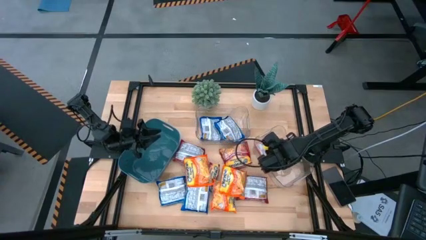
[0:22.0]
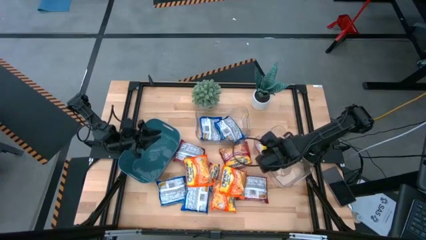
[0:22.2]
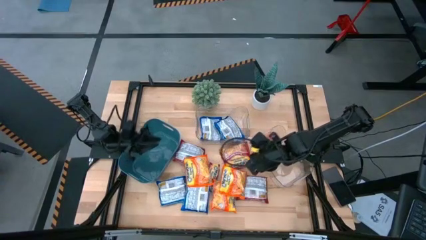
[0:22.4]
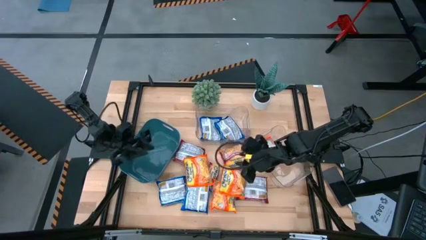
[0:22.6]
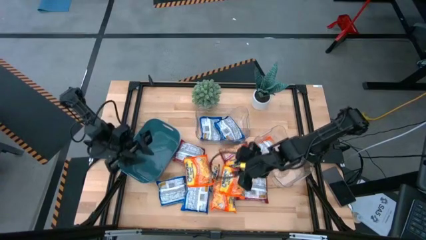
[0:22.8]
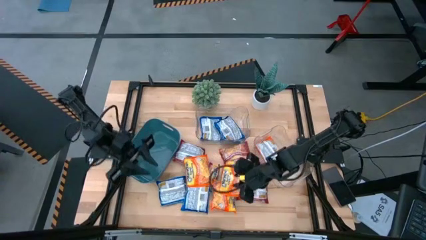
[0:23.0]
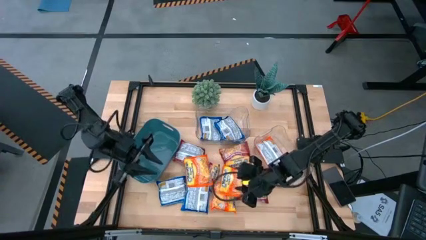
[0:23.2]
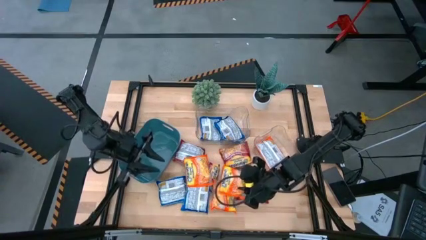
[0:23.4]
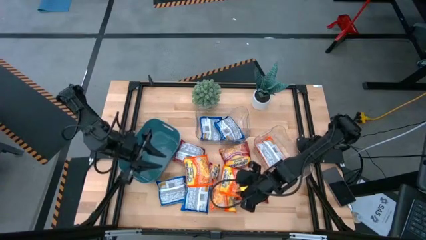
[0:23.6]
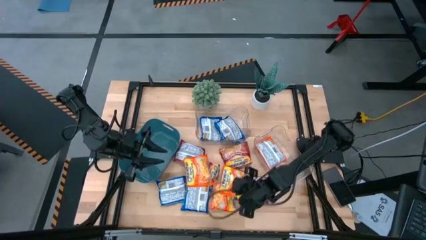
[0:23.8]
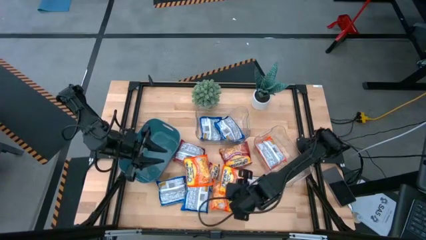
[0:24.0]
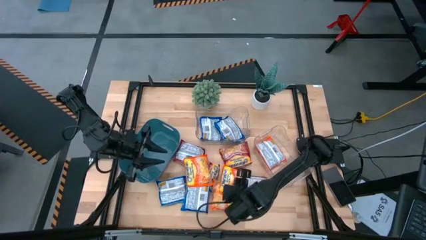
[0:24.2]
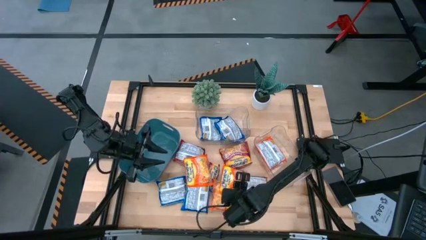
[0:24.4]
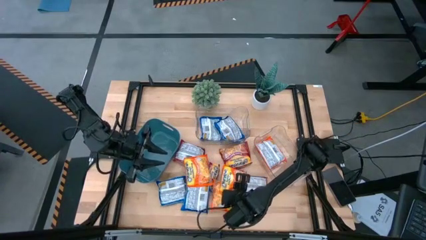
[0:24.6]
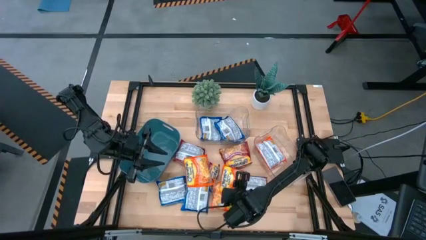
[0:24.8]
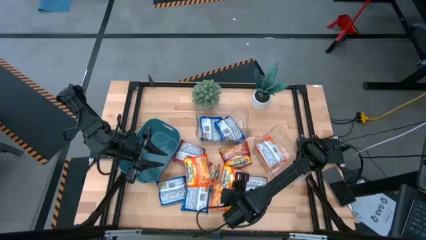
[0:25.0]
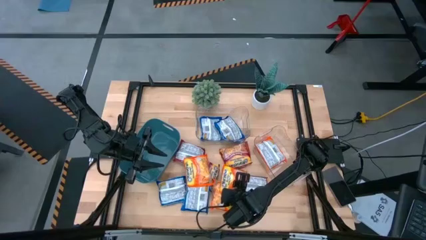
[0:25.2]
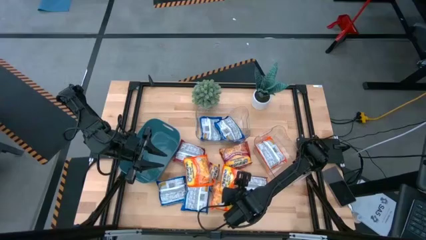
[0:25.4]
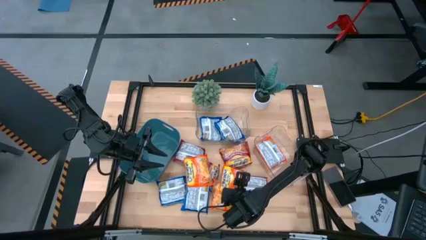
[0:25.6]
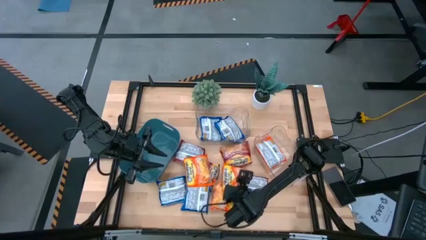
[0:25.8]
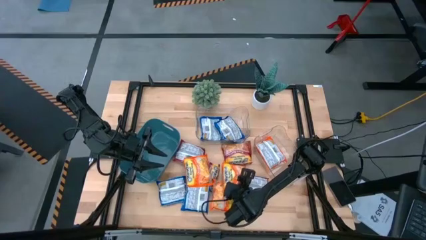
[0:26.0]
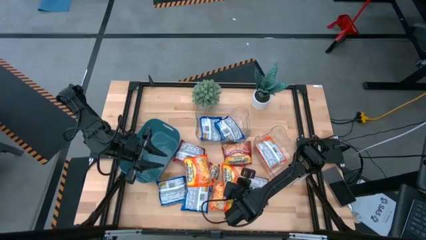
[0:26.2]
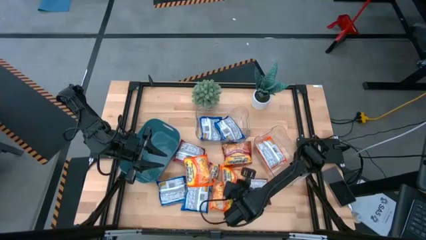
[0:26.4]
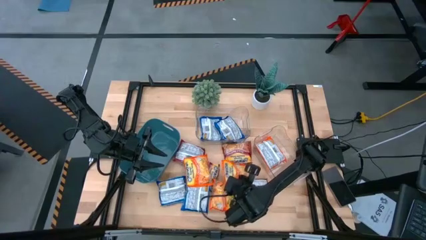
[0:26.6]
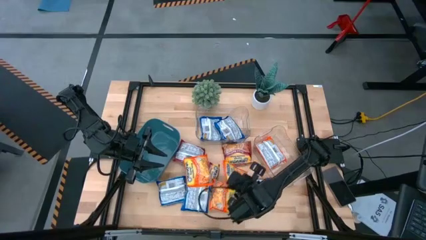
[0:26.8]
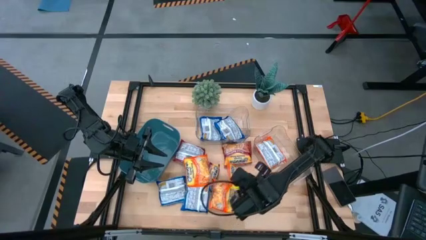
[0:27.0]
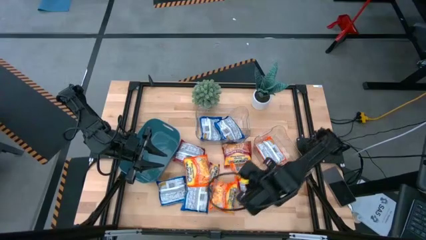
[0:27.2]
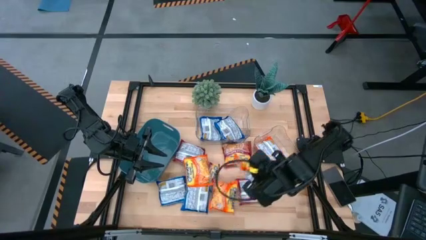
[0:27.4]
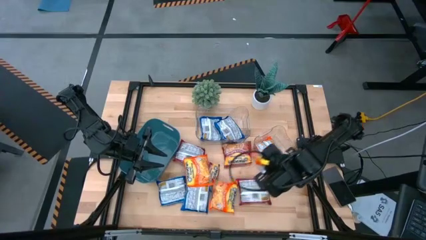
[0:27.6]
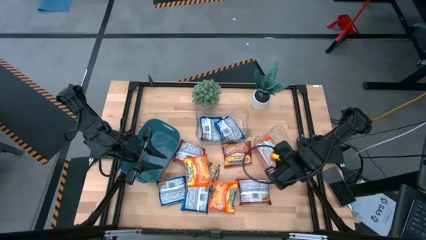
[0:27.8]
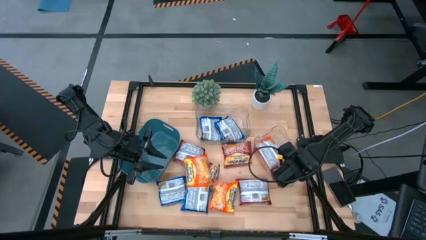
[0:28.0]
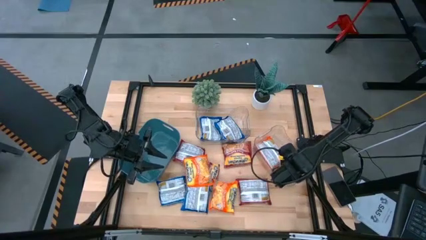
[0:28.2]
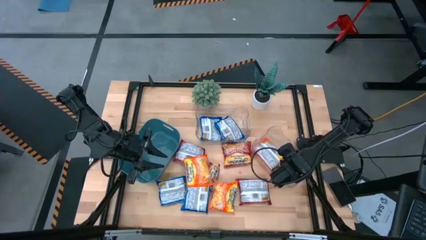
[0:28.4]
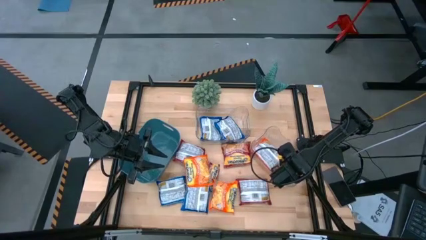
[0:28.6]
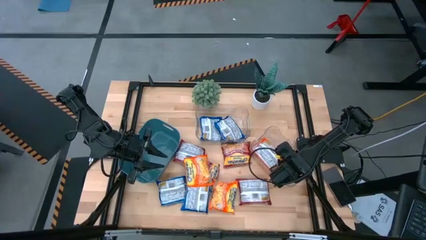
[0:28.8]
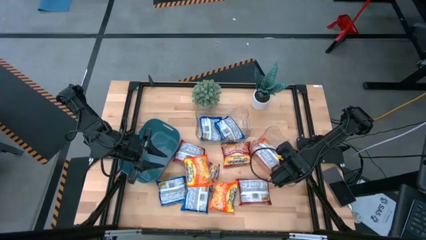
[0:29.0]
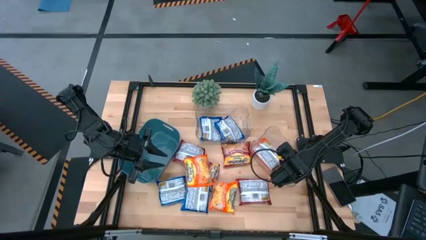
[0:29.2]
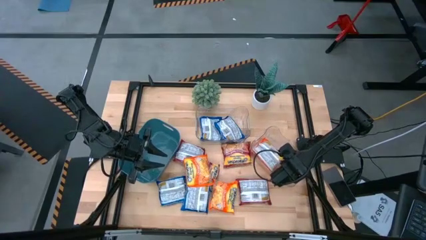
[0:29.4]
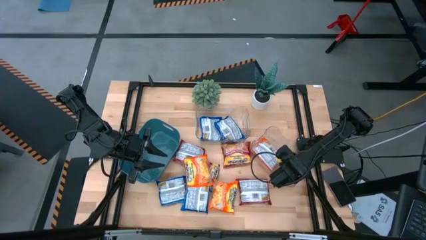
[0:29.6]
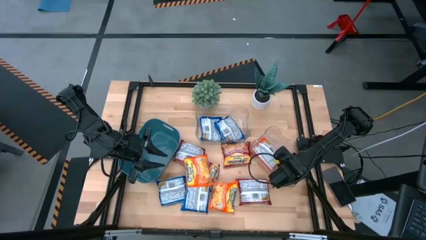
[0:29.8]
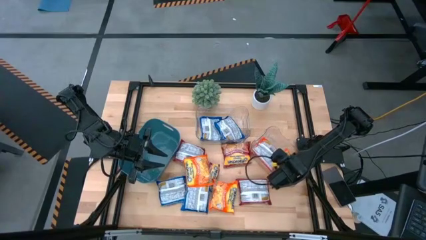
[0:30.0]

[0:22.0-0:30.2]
Task: Sort Maruchan noodles
Put the right orange noodle pack into the right transparent bin

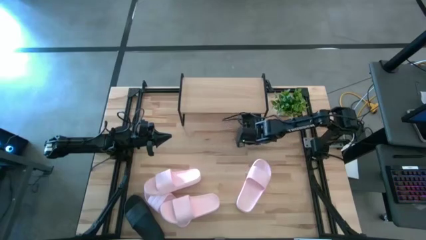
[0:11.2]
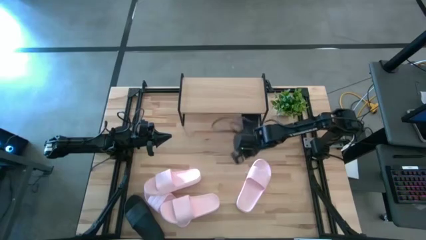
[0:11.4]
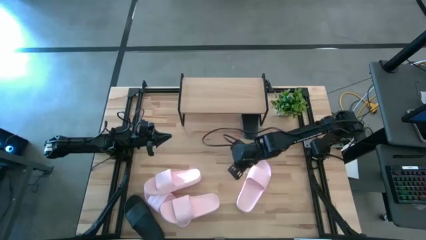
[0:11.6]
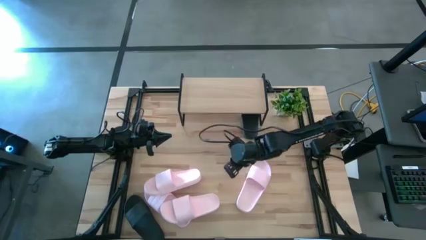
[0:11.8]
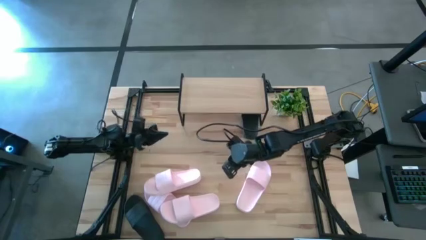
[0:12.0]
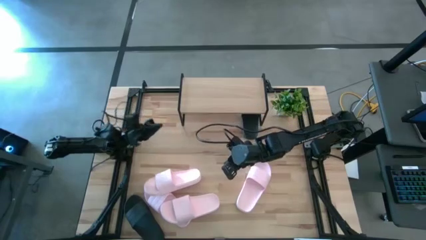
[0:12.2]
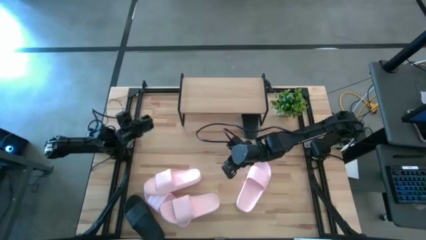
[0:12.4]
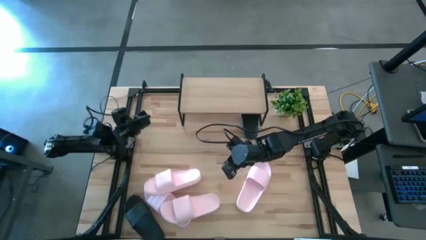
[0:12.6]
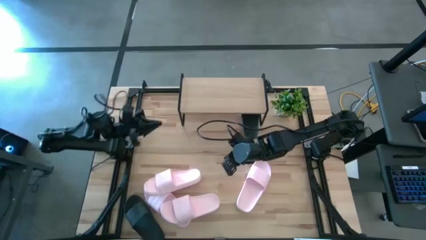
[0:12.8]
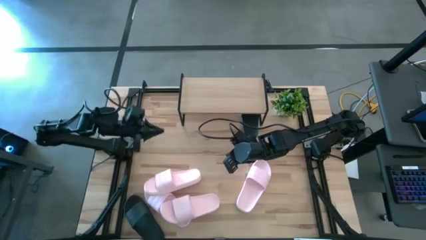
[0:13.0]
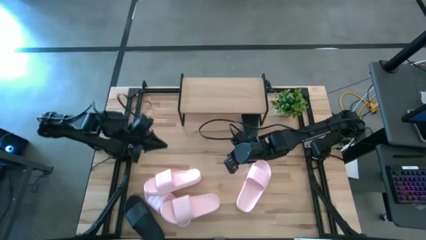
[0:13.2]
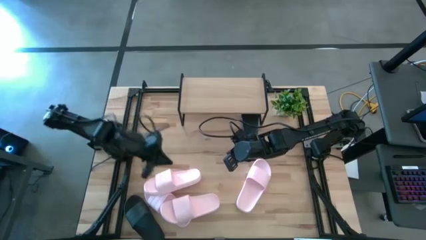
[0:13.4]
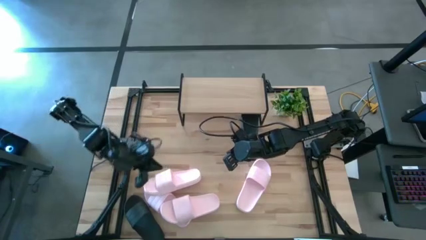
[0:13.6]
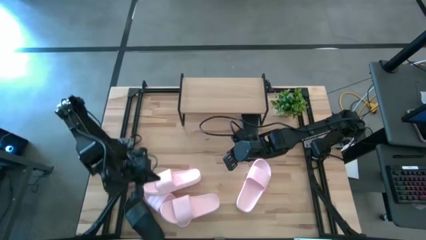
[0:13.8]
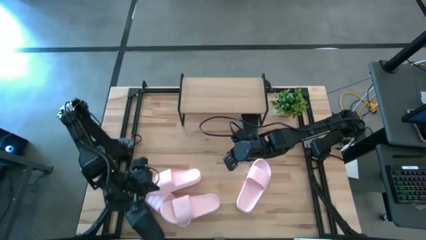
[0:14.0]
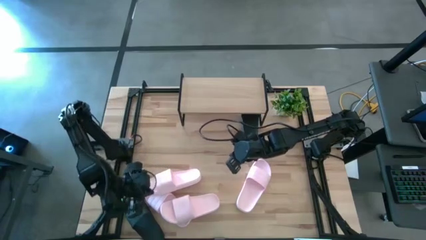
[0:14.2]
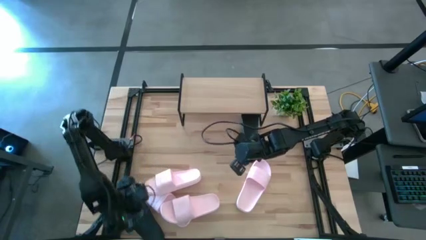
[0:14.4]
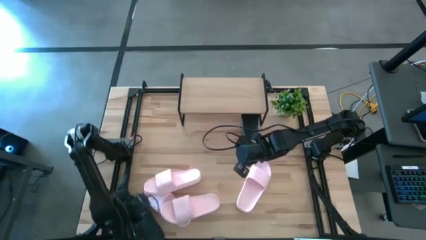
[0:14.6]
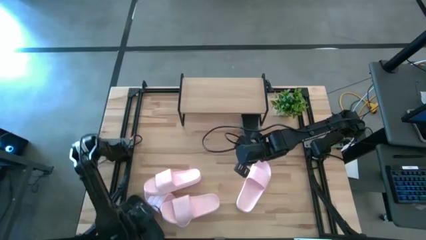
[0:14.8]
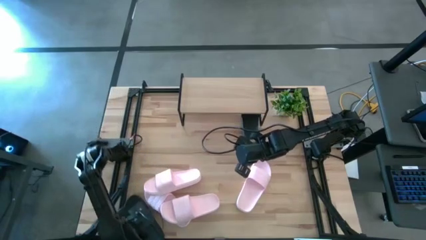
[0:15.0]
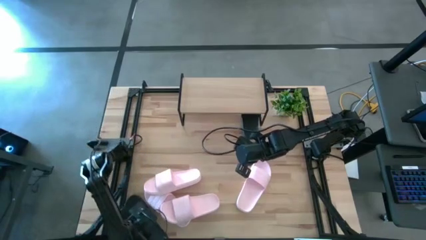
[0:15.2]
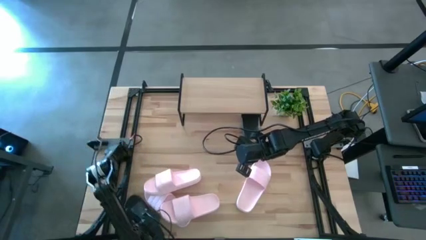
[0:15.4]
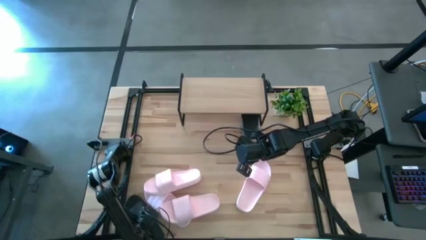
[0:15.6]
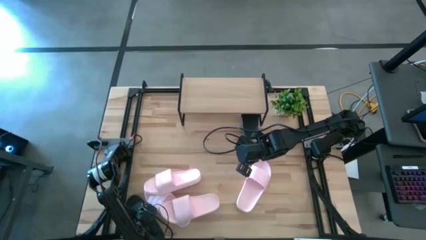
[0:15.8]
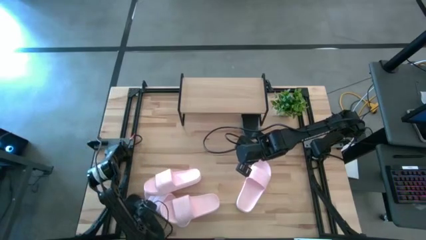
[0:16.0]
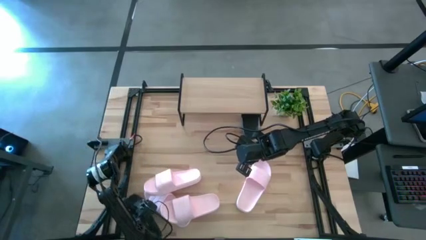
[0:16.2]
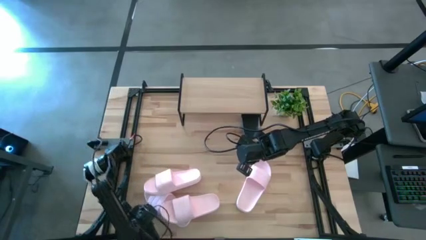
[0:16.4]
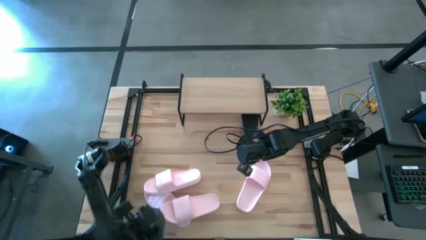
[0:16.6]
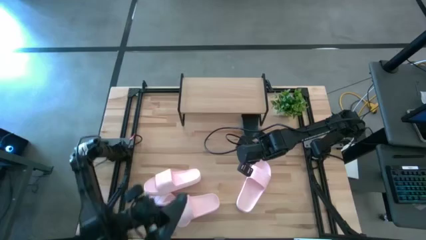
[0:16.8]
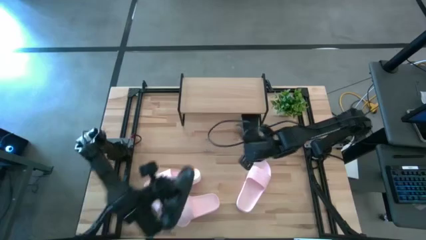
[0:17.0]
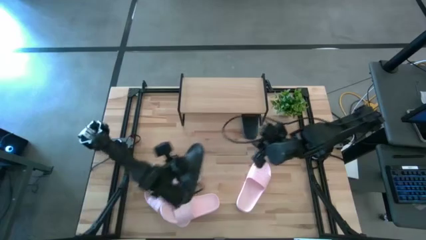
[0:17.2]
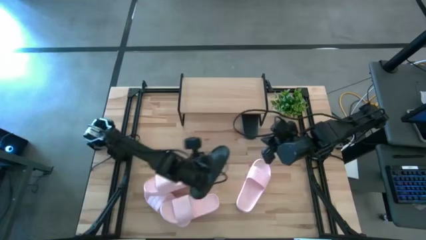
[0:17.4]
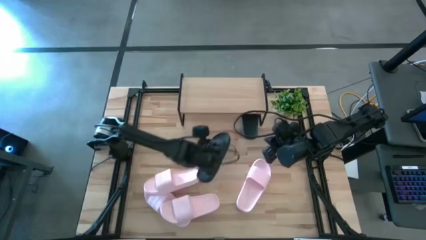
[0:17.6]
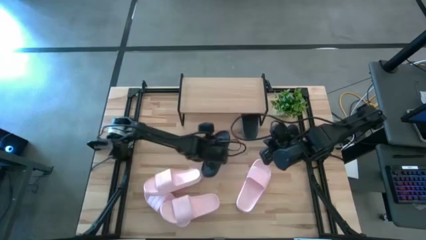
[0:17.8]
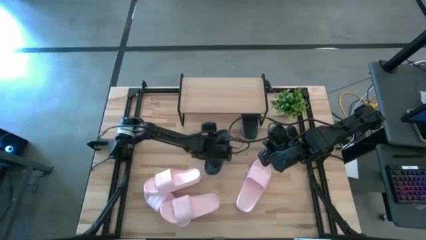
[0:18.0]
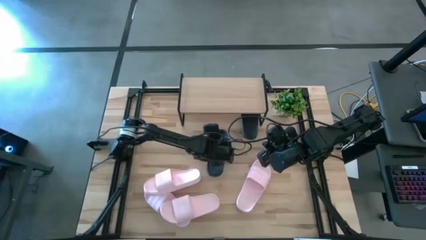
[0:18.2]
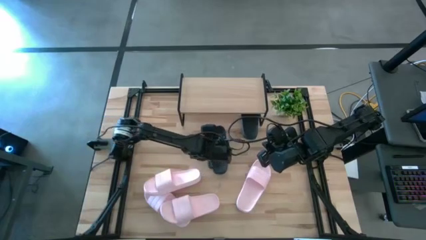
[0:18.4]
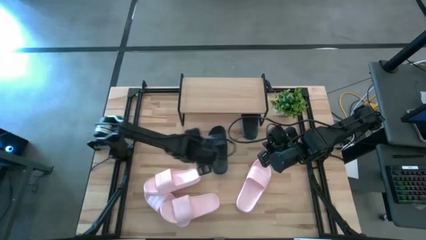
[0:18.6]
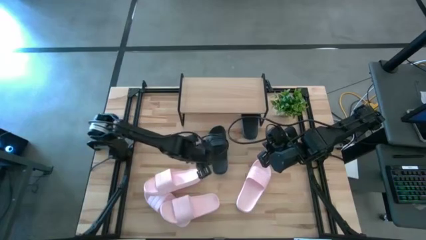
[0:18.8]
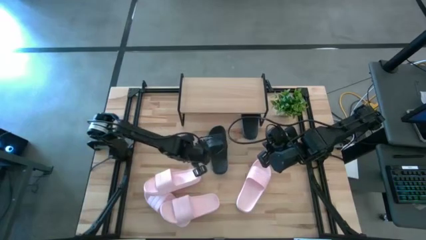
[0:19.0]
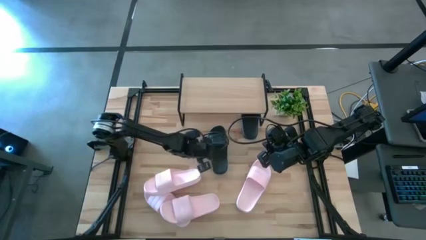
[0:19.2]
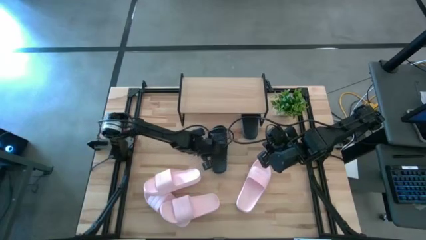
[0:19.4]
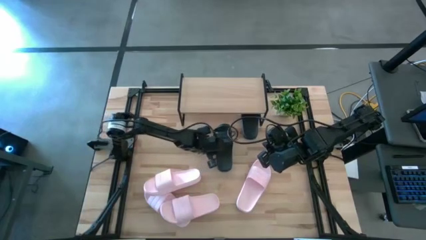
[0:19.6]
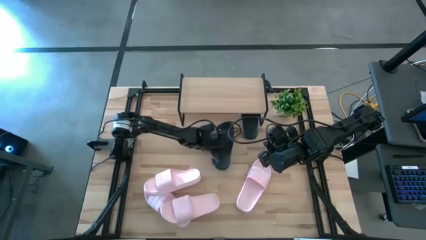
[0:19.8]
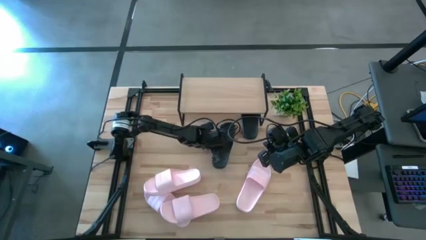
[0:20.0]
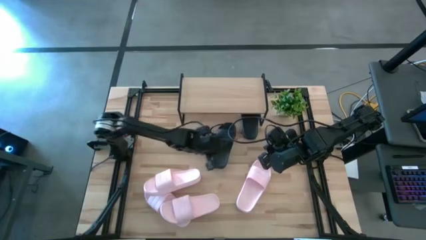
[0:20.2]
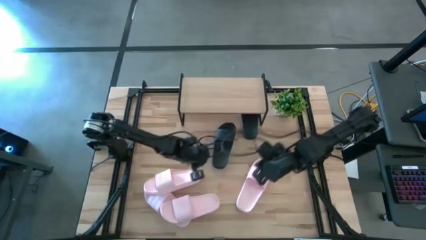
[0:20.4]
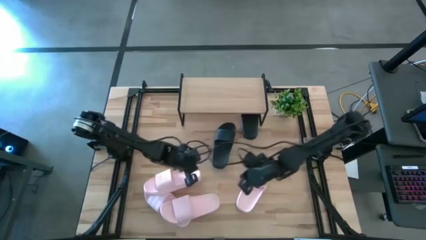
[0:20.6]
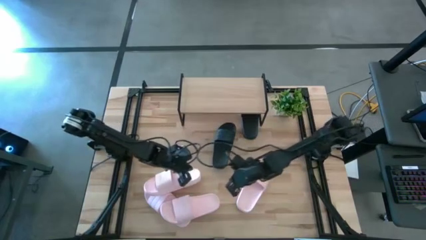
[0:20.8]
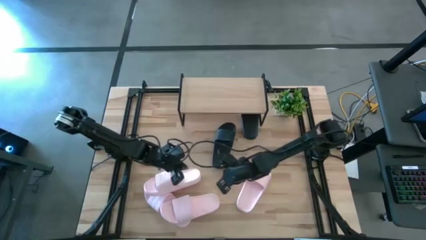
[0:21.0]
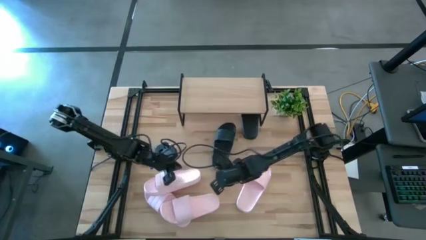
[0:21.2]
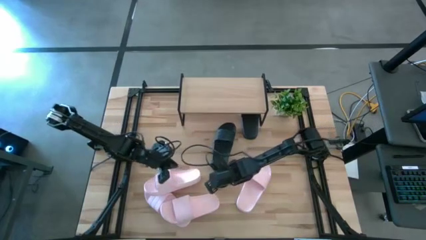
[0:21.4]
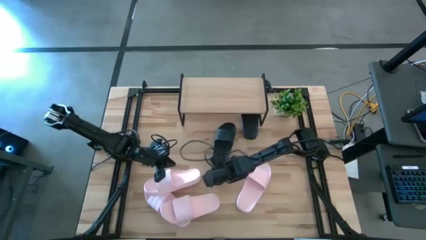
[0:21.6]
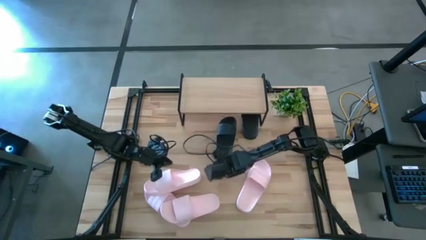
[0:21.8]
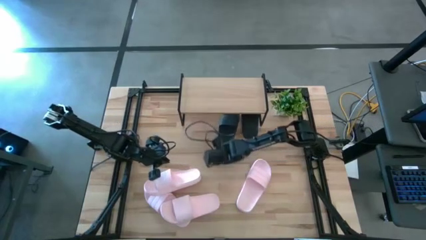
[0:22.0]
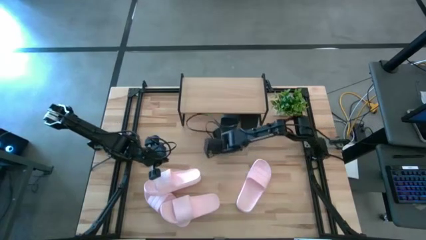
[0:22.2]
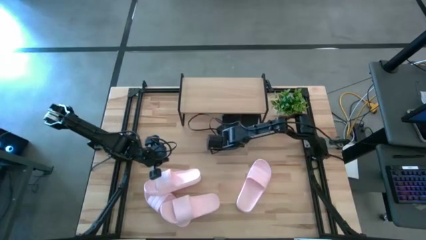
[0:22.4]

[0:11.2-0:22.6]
Task: Pick and place slides into the shelf
Put the black slipper under the shelf
